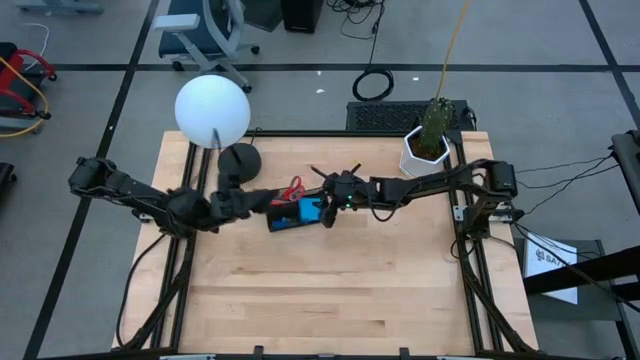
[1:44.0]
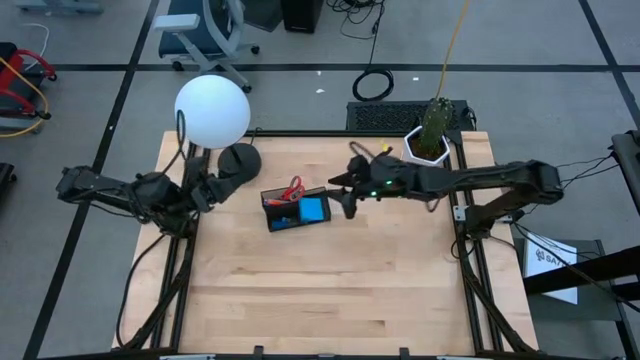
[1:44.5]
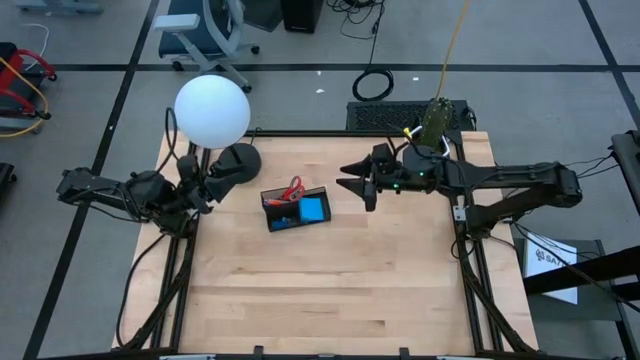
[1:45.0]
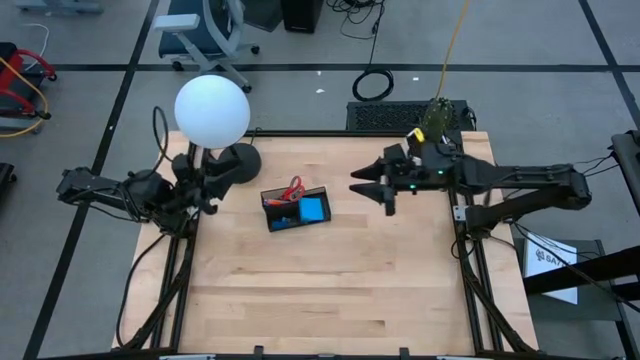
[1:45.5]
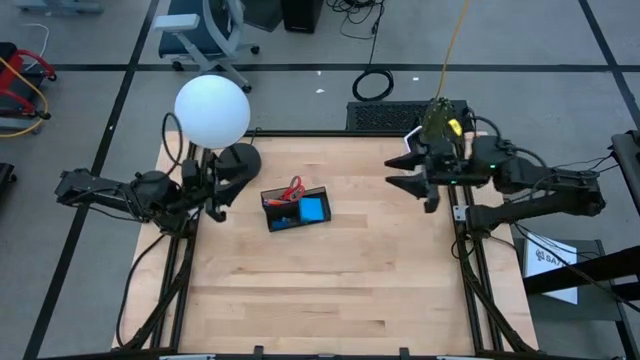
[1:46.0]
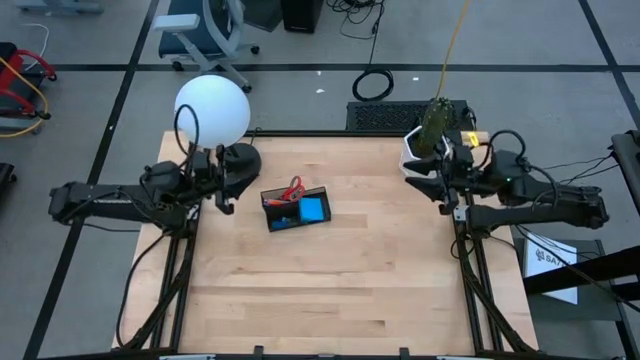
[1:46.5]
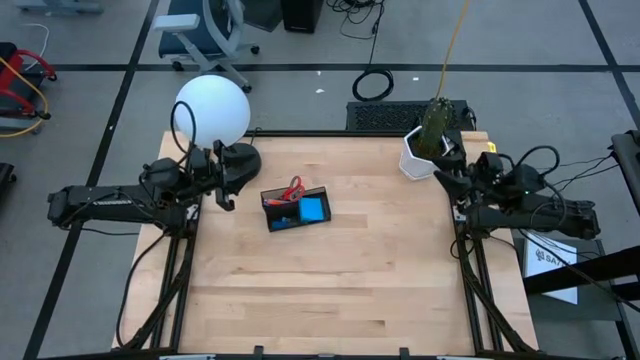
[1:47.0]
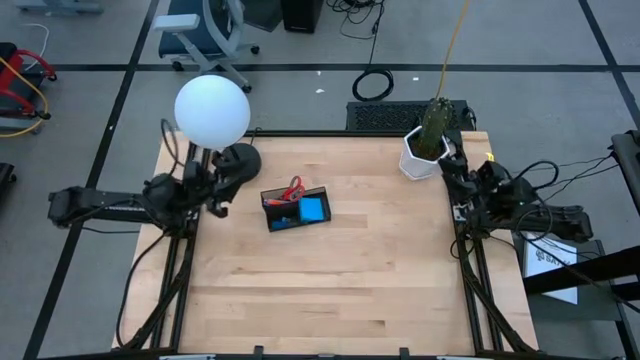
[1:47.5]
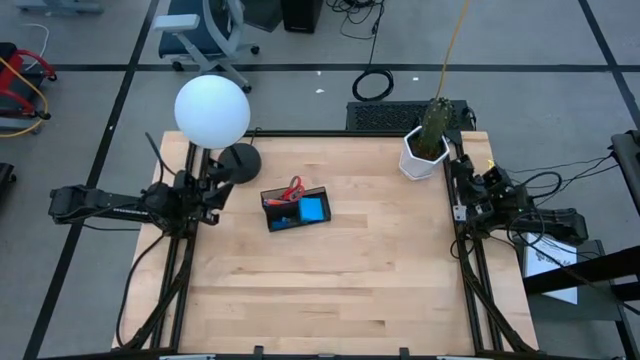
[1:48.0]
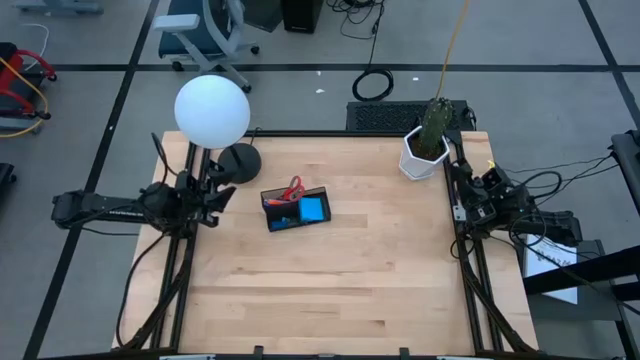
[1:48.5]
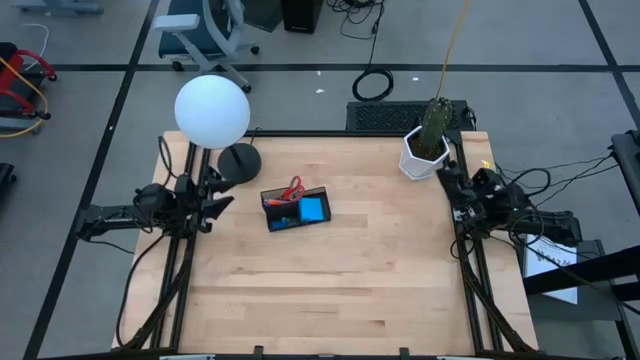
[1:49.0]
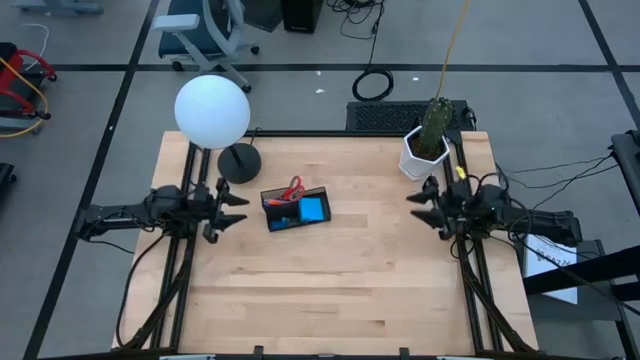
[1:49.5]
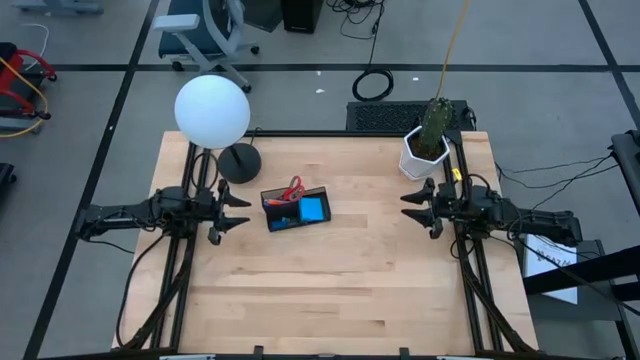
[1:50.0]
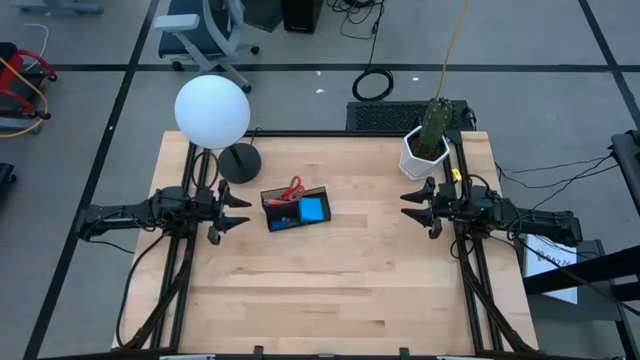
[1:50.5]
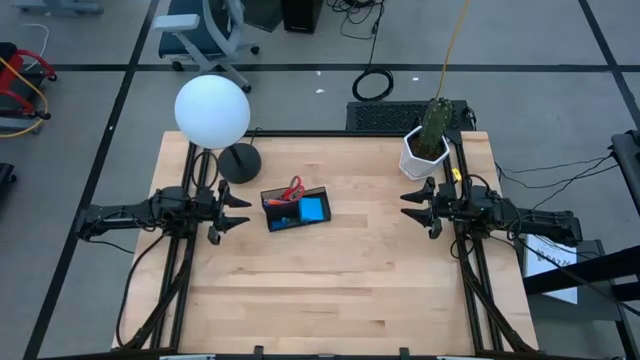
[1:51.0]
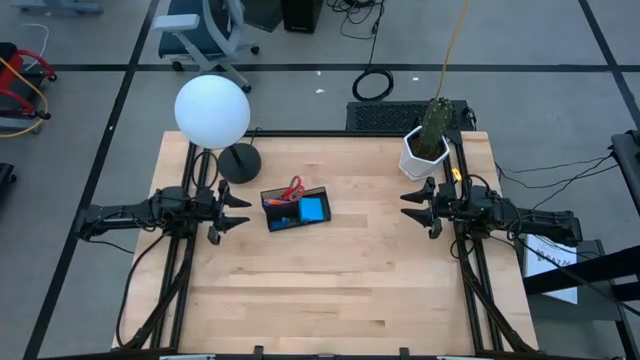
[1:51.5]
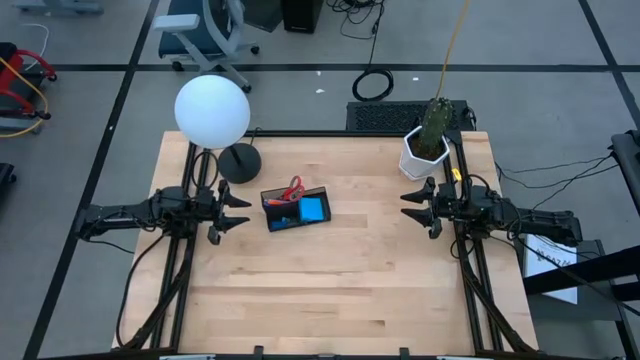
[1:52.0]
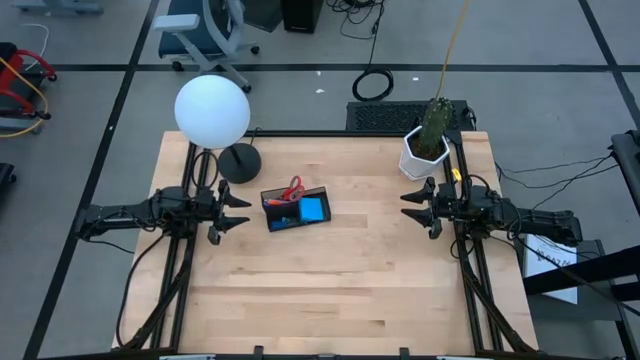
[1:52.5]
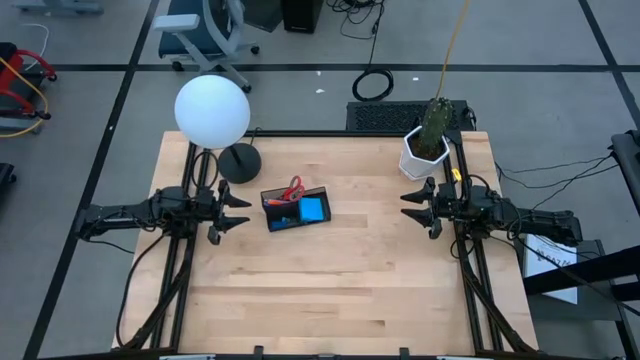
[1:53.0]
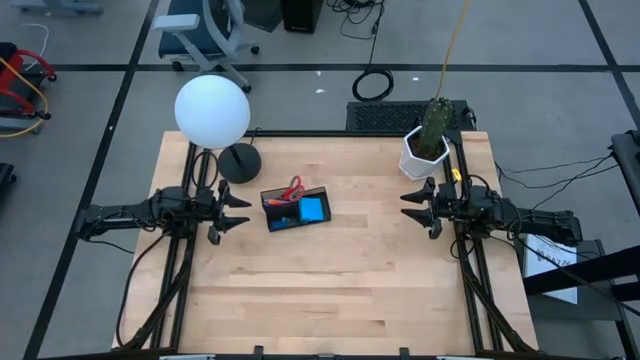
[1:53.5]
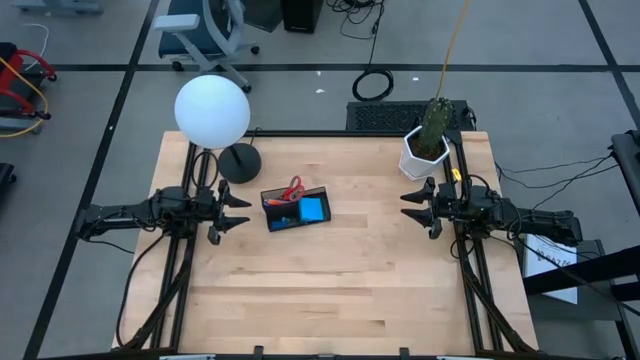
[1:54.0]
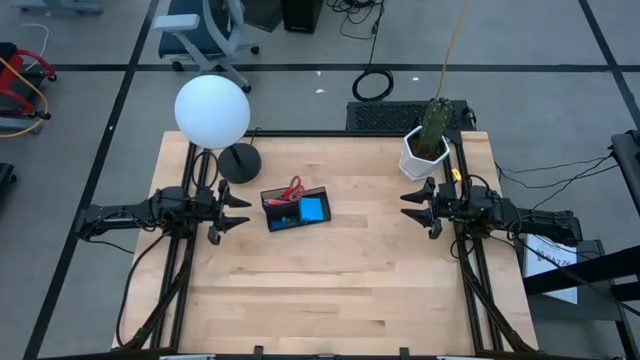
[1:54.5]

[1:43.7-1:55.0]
Task: Pick and place office supplies into organizer
Return to Home Position

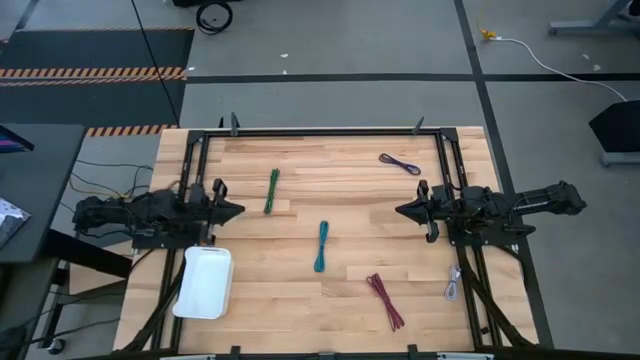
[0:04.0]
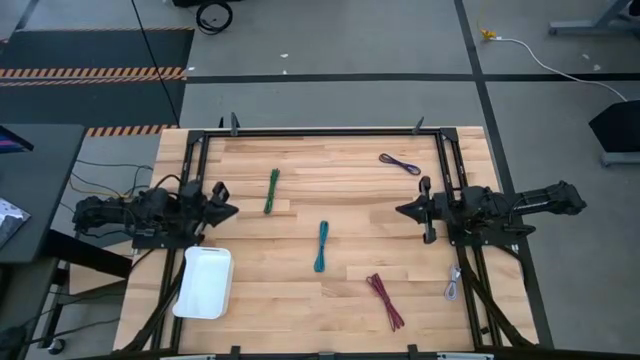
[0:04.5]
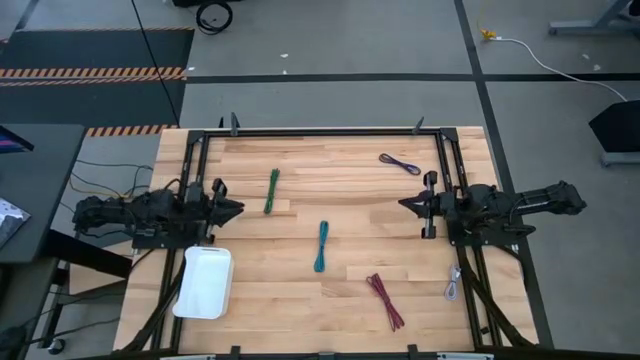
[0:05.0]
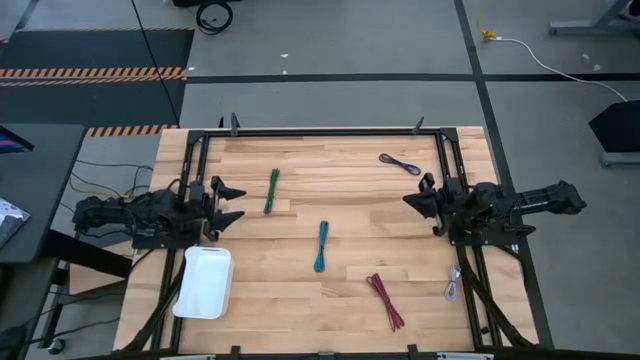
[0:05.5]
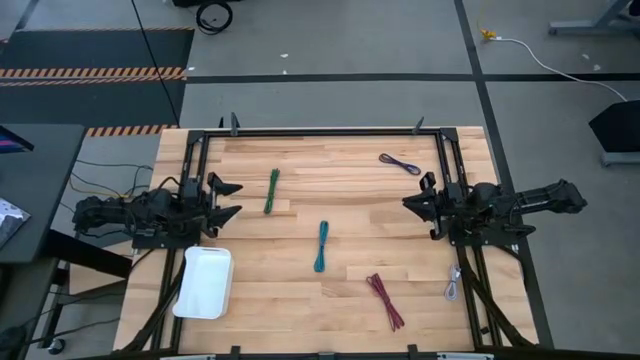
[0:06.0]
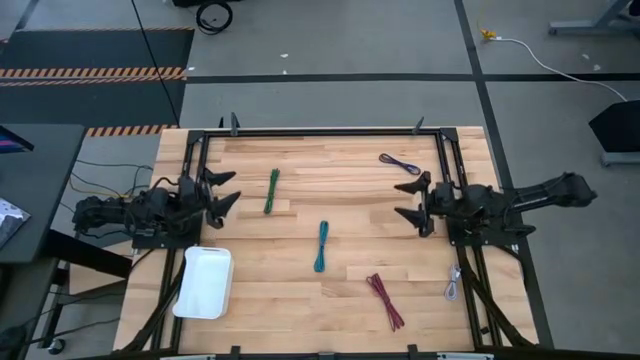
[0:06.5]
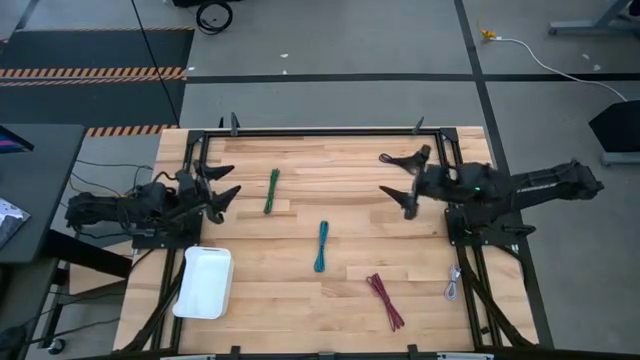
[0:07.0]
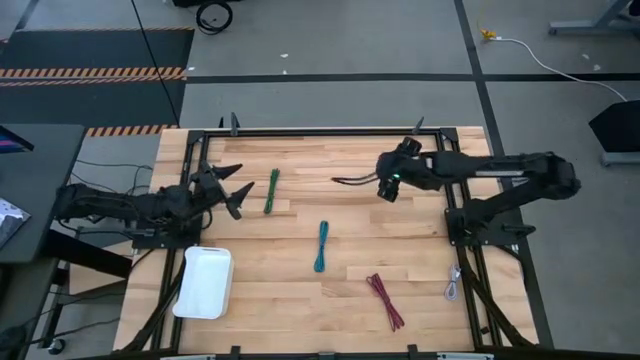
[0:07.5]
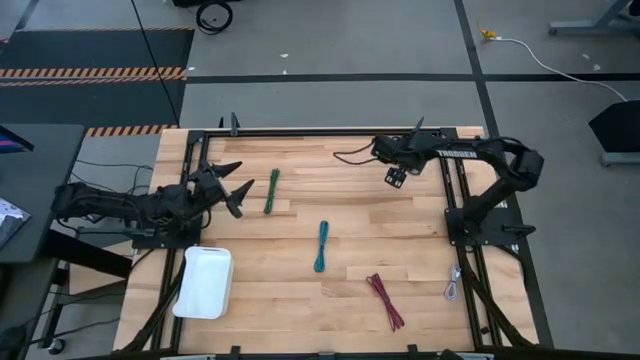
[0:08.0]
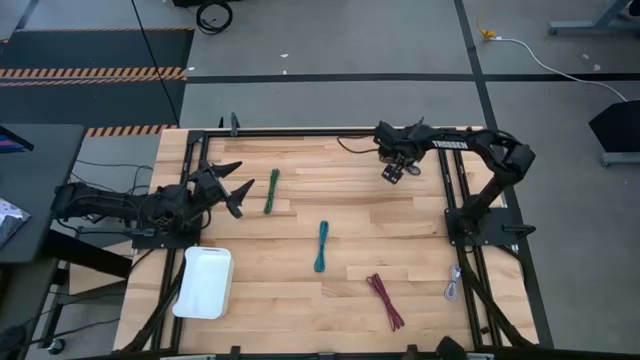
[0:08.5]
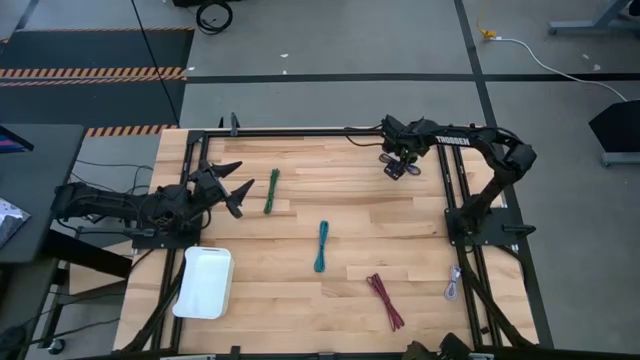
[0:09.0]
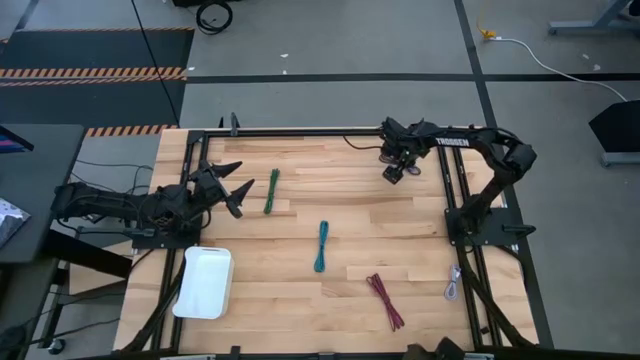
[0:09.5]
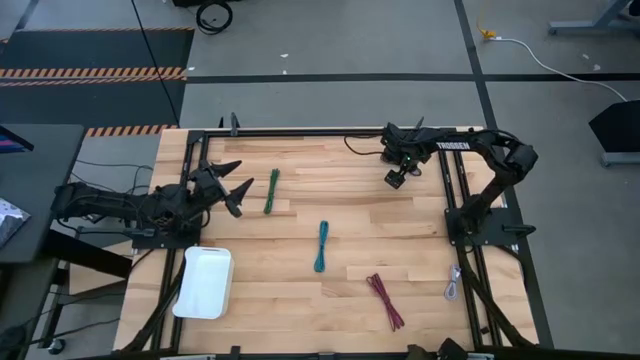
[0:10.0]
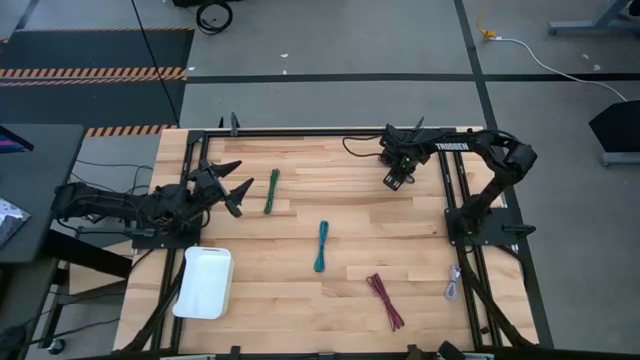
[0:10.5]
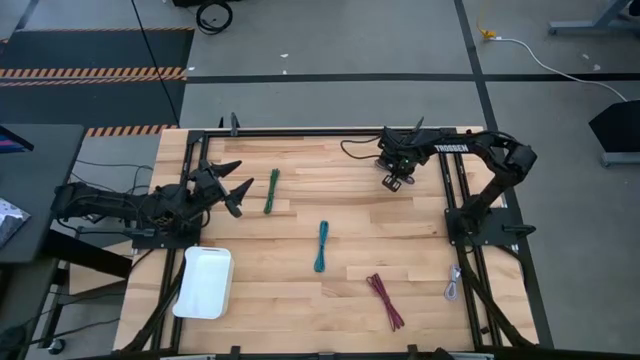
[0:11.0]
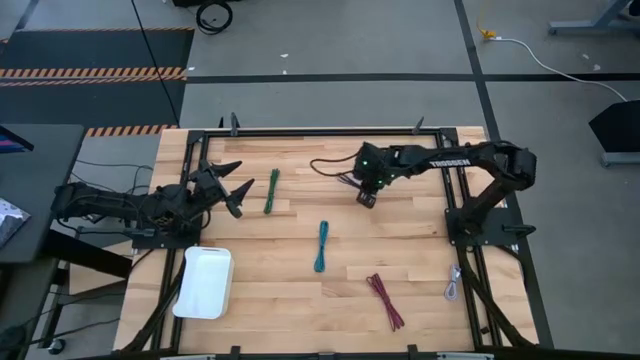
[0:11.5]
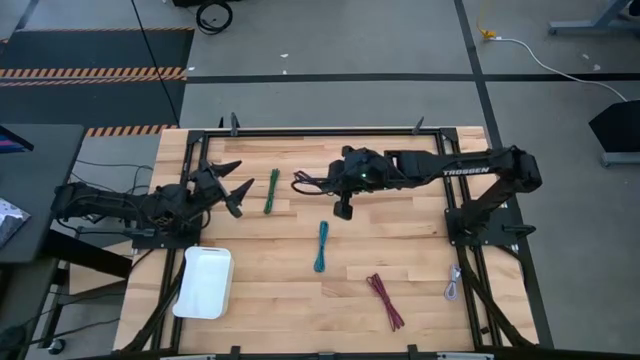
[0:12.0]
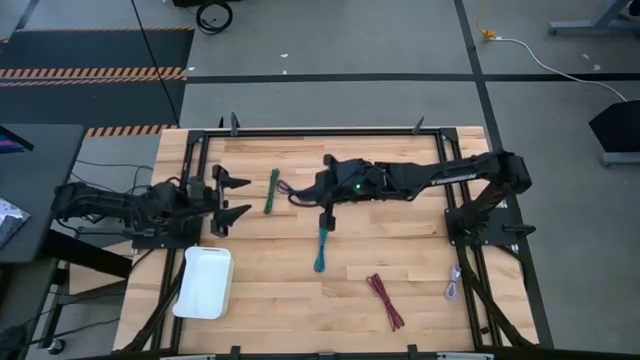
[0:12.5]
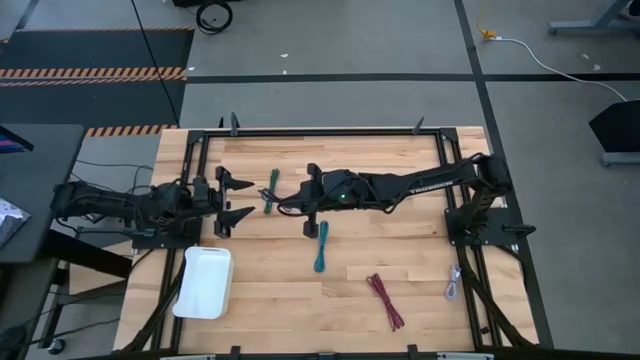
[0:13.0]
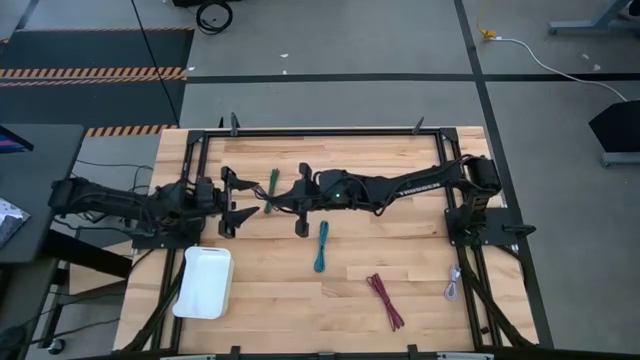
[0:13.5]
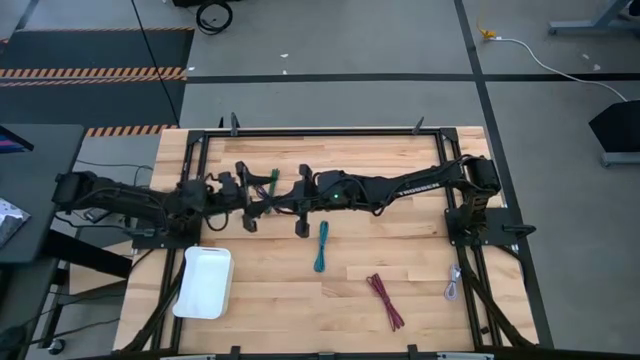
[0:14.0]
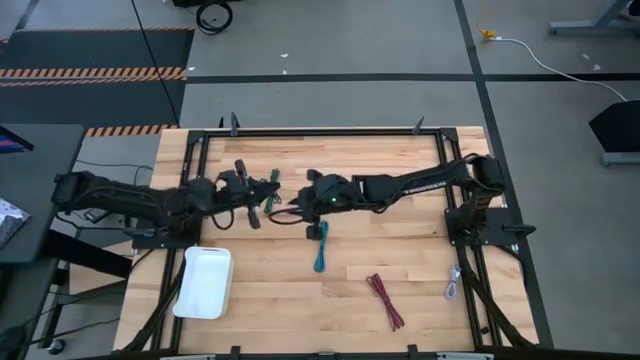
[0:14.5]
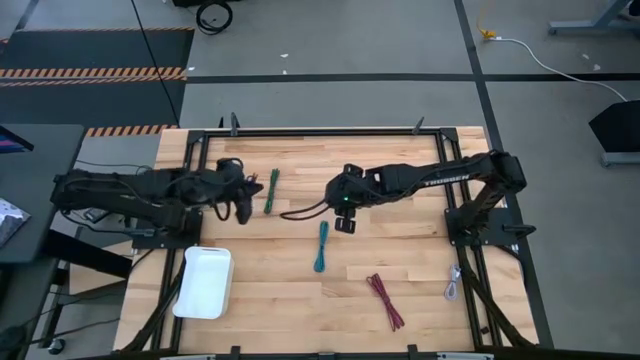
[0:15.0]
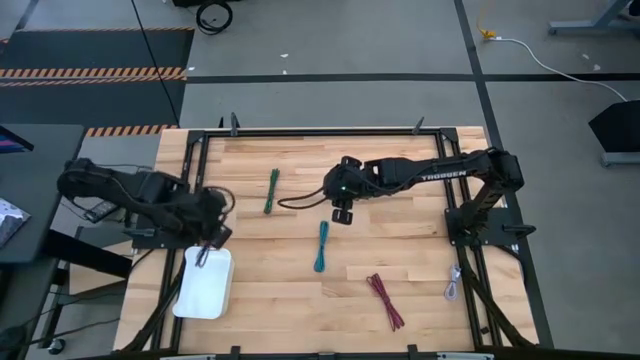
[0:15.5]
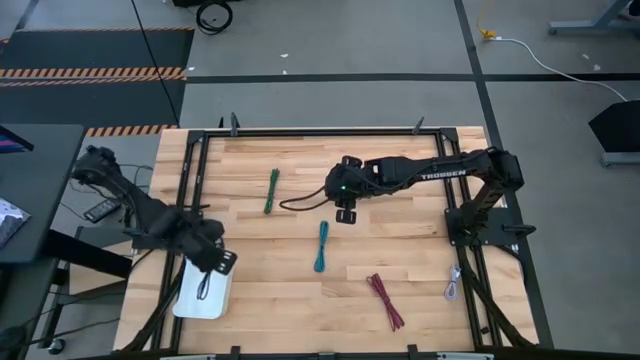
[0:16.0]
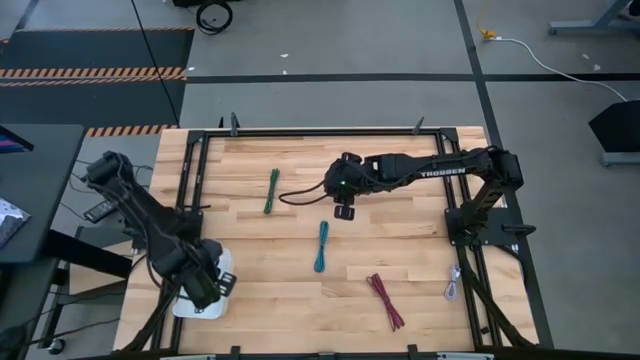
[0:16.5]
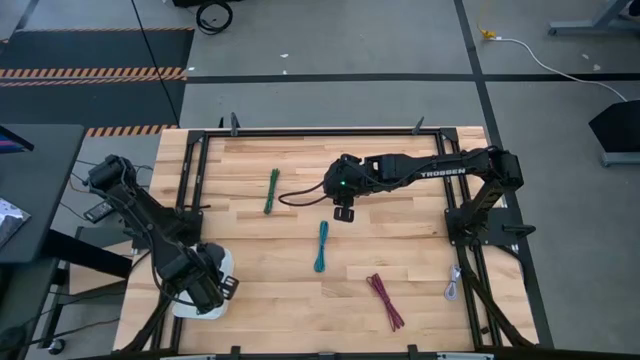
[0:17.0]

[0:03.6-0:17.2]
Task: Pick and place USB-C Cables
Put the dark blue charger cable into the white bin
